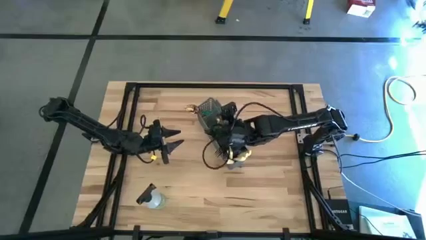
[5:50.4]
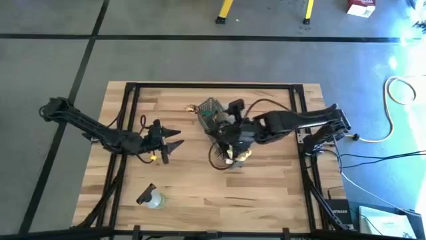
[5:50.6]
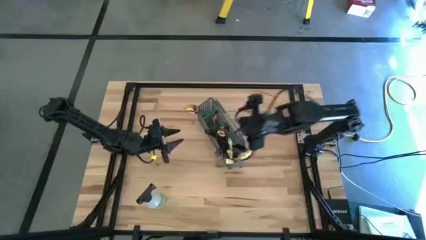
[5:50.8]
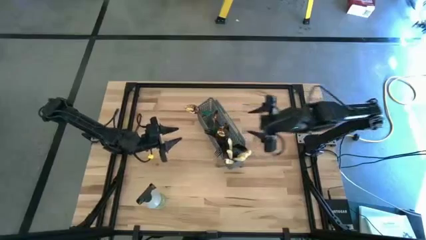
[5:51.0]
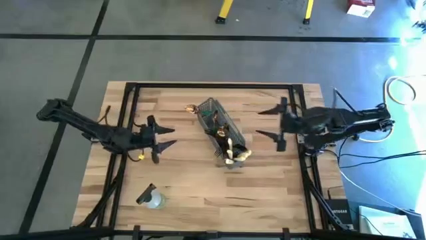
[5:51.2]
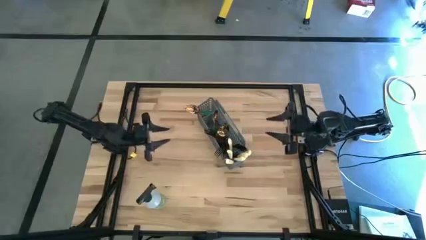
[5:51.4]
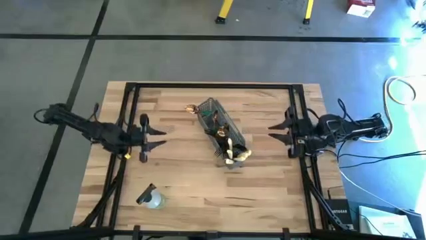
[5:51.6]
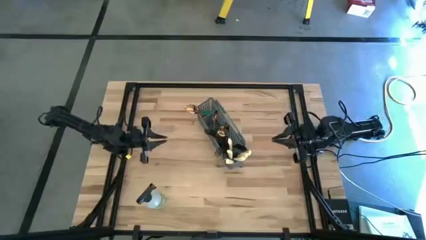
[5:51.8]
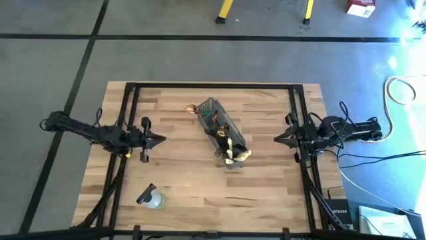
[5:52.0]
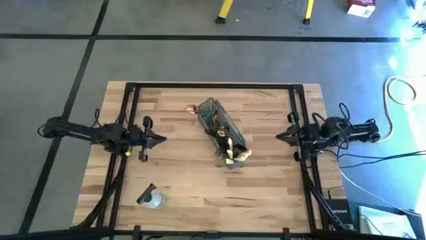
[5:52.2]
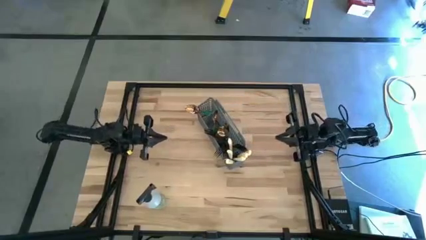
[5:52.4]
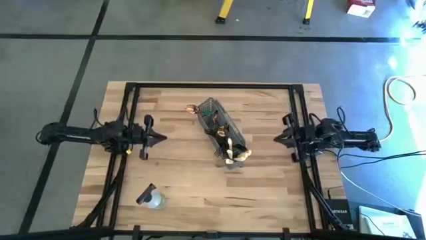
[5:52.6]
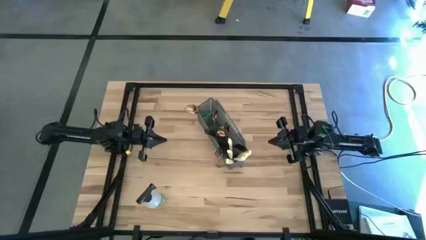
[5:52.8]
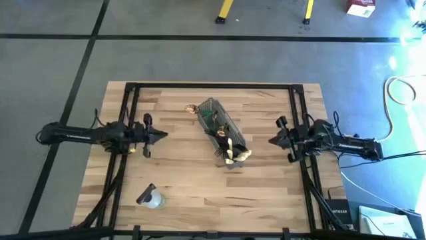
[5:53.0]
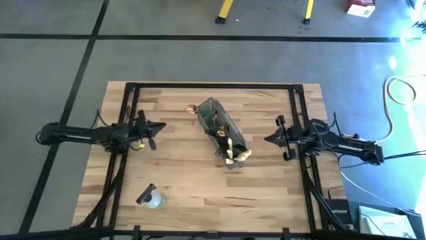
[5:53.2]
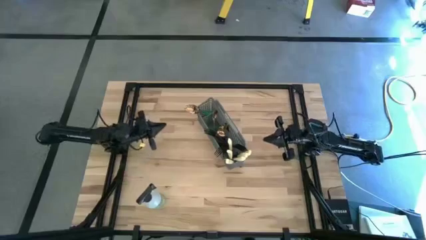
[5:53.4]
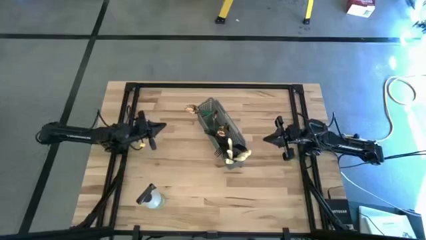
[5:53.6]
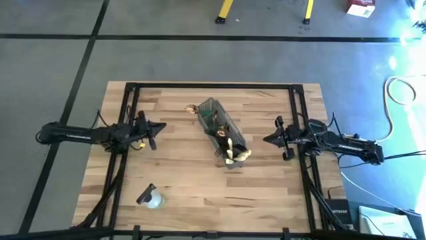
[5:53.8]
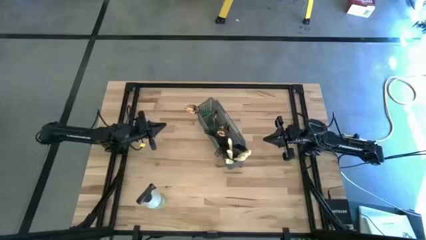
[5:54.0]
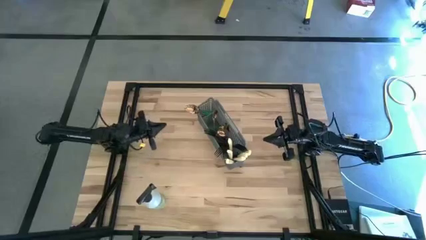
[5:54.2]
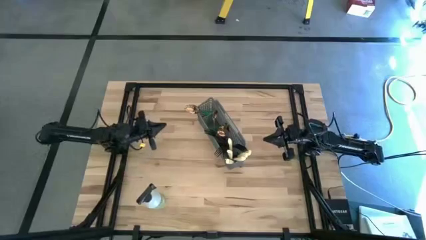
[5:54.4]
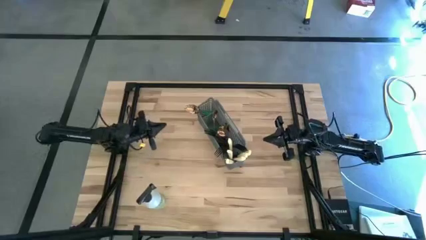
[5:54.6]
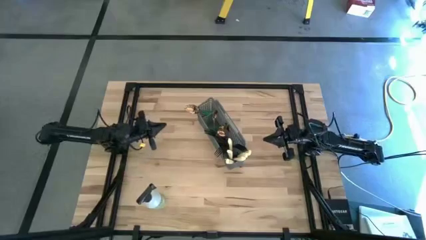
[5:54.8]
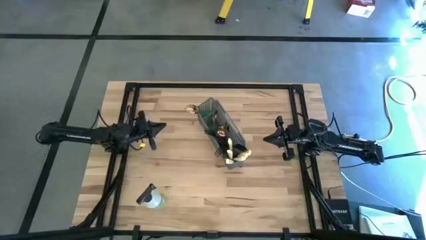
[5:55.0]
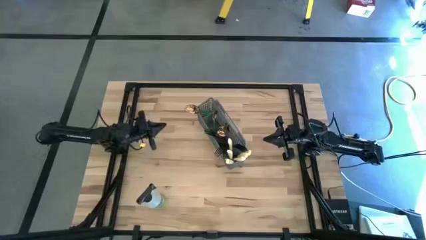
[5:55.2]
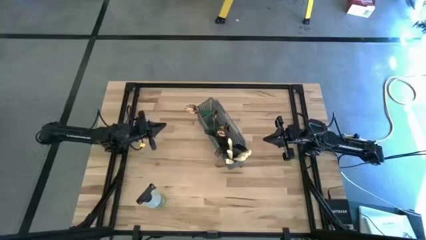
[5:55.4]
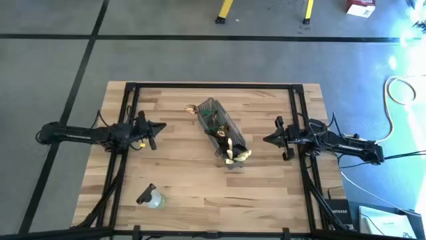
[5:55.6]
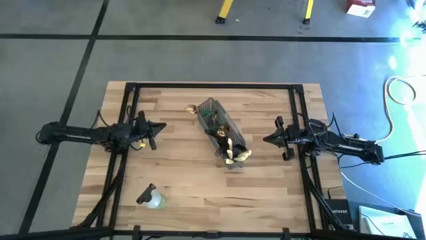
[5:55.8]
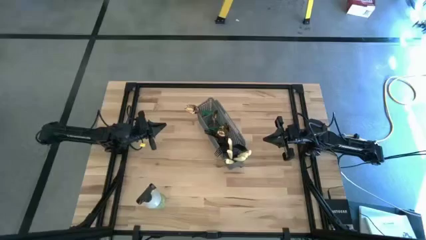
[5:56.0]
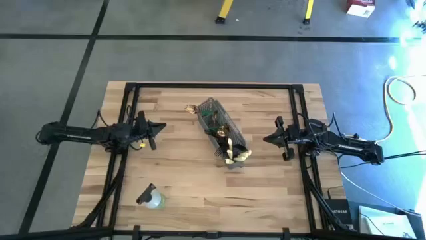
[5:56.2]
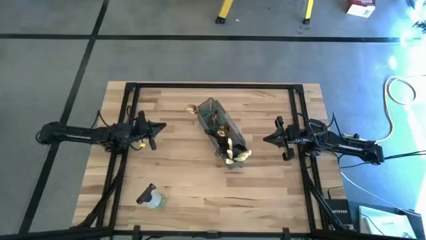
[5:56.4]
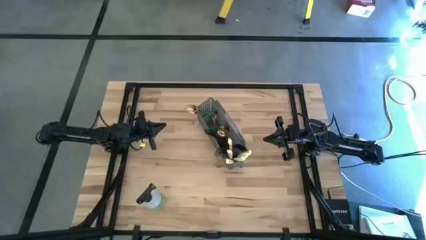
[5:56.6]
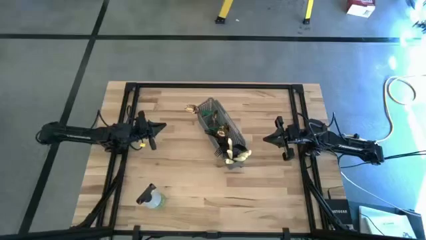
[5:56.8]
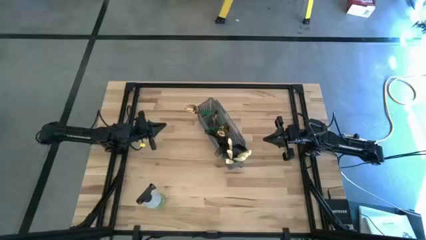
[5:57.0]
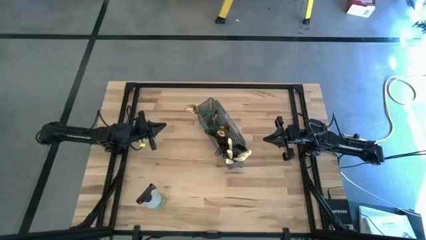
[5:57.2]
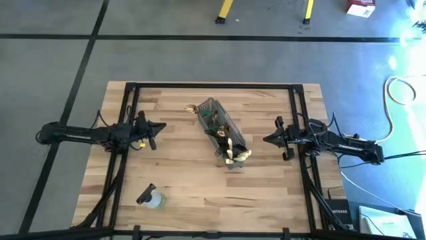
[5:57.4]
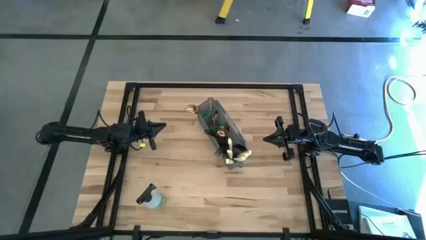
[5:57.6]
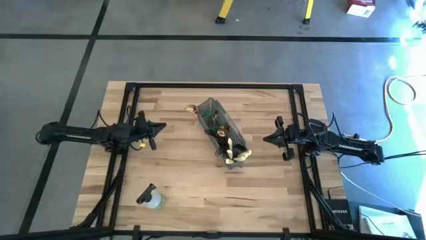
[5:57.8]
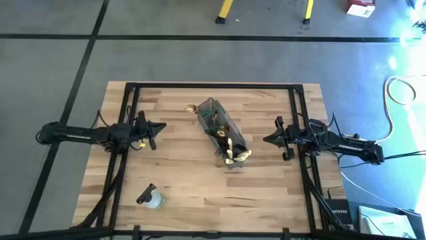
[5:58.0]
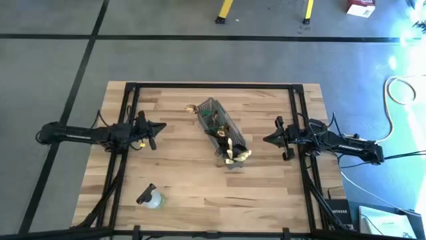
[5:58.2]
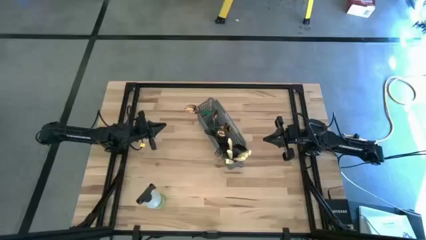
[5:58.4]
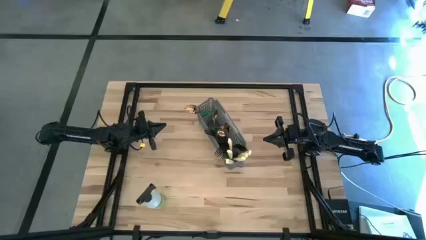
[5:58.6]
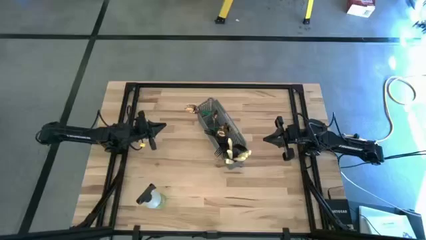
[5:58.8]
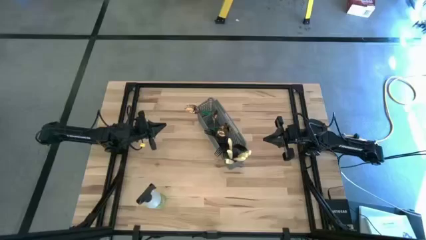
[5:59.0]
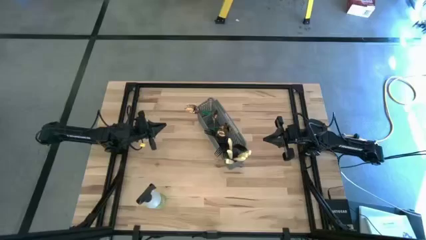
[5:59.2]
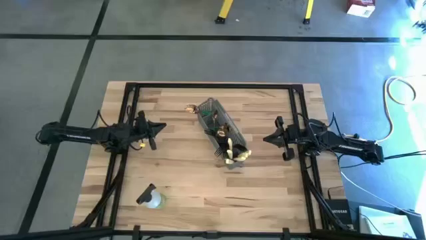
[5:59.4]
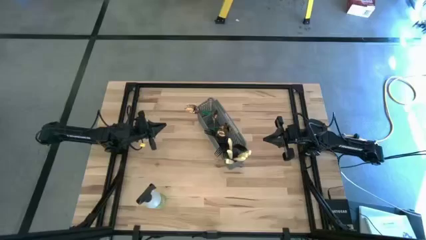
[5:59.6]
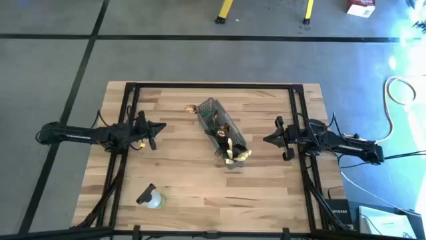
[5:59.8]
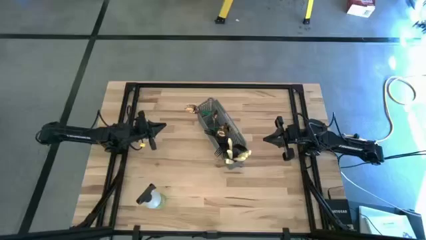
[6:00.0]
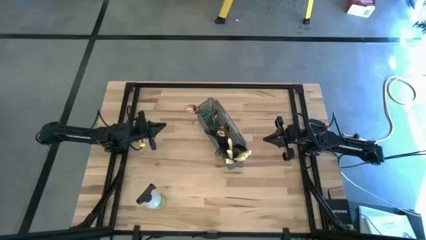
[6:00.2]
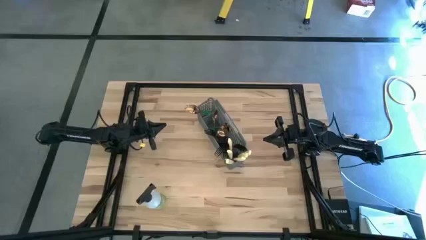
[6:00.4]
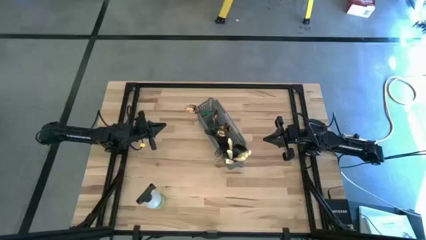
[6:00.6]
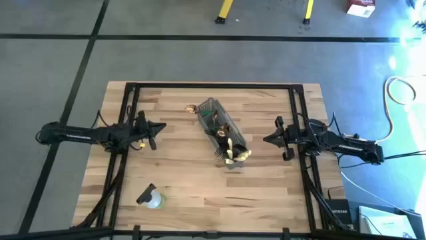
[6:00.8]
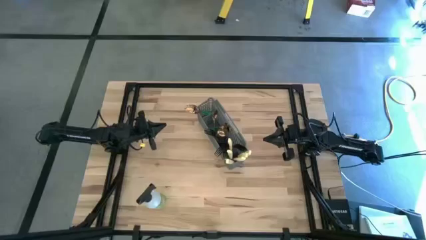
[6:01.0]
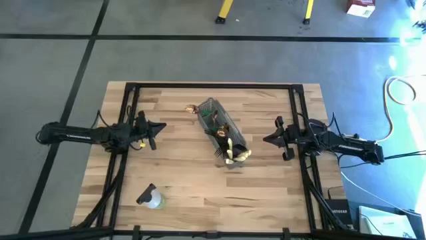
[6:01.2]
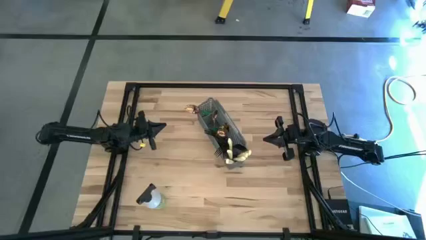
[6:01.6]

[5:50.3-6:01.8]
Task: Sort silverware
Return to Home Position

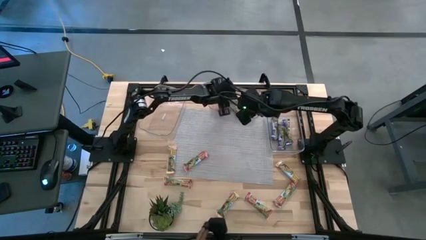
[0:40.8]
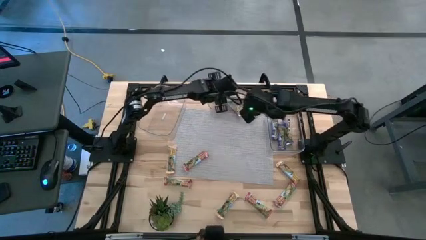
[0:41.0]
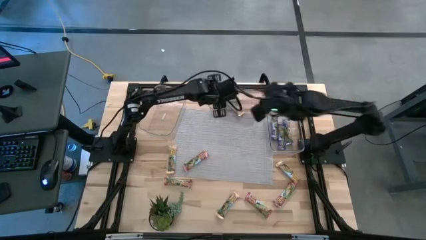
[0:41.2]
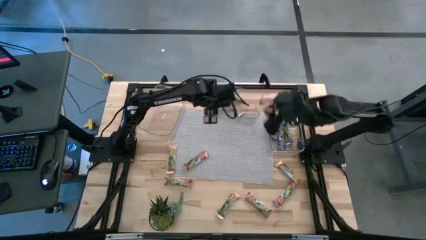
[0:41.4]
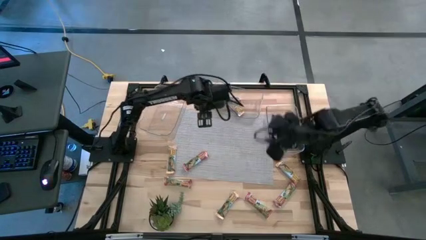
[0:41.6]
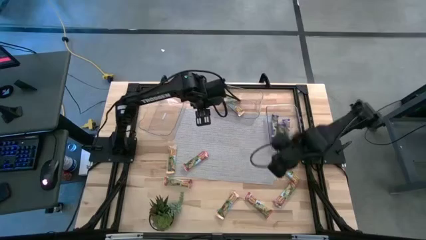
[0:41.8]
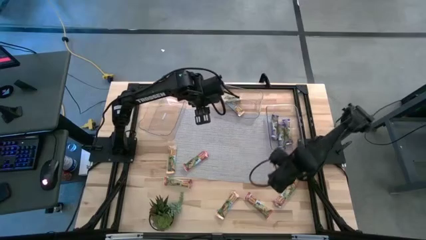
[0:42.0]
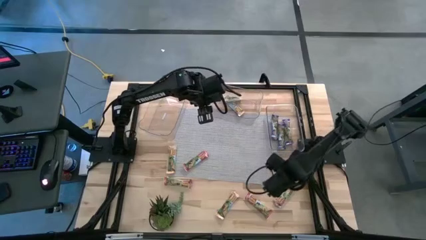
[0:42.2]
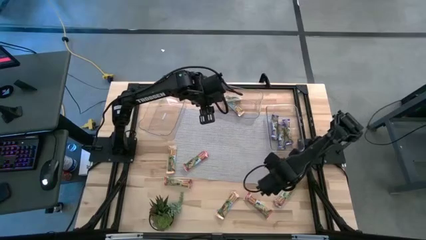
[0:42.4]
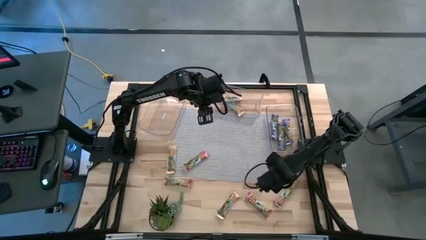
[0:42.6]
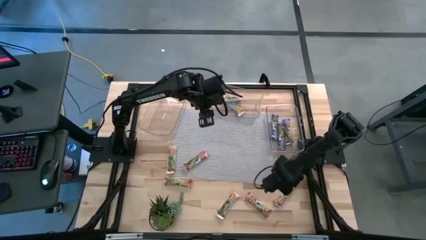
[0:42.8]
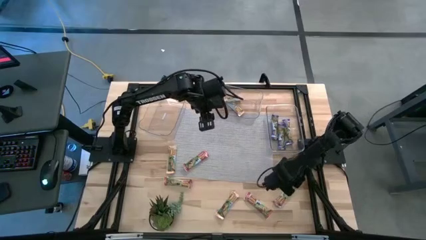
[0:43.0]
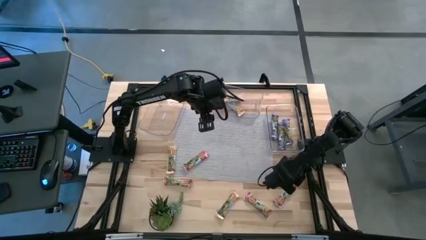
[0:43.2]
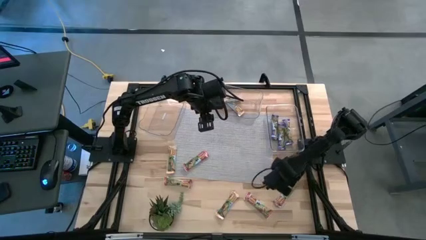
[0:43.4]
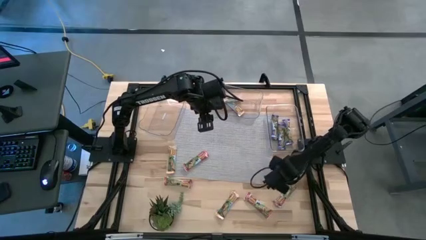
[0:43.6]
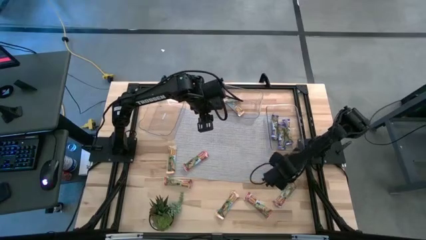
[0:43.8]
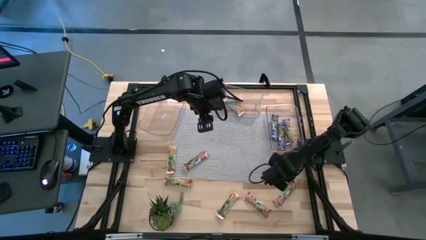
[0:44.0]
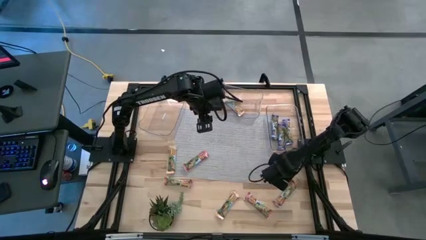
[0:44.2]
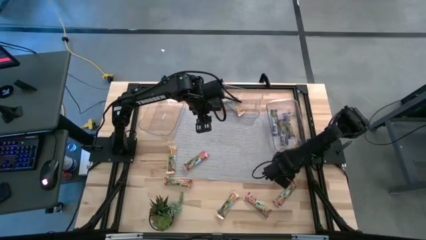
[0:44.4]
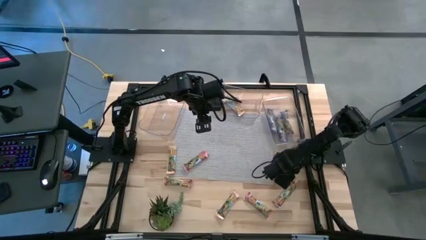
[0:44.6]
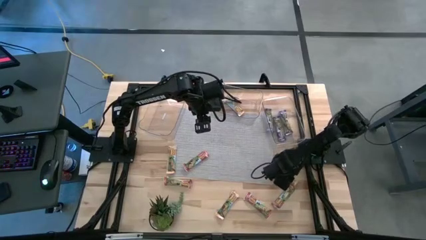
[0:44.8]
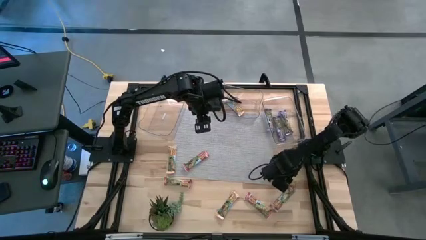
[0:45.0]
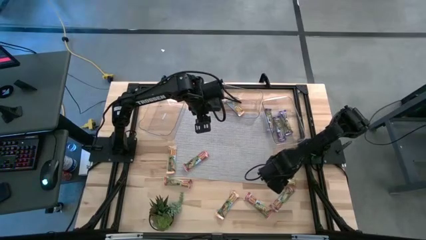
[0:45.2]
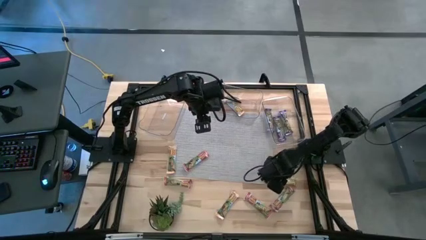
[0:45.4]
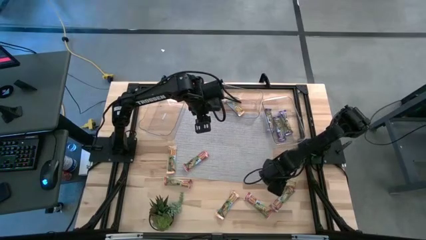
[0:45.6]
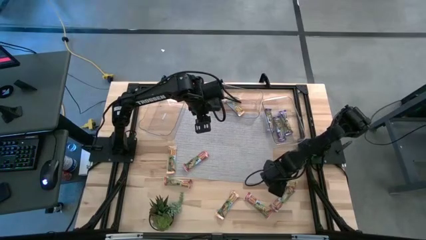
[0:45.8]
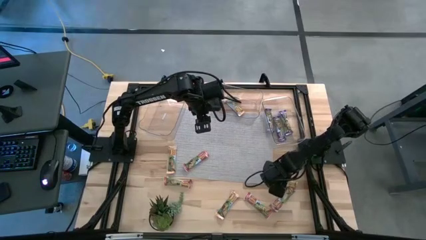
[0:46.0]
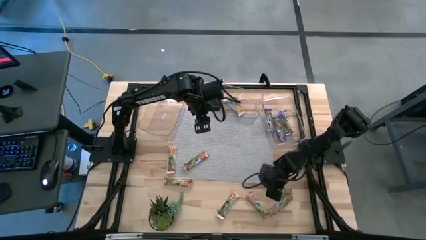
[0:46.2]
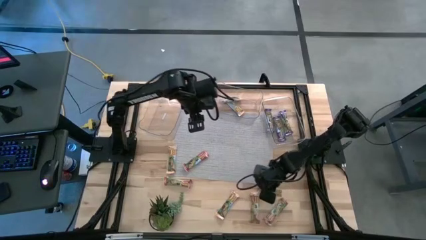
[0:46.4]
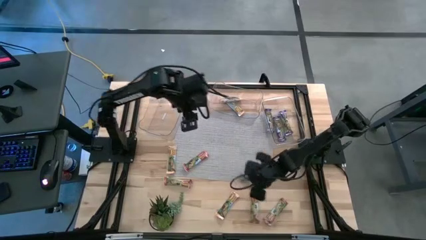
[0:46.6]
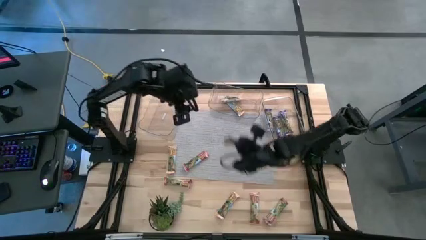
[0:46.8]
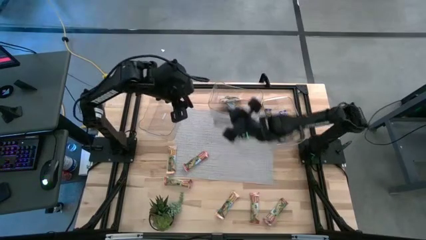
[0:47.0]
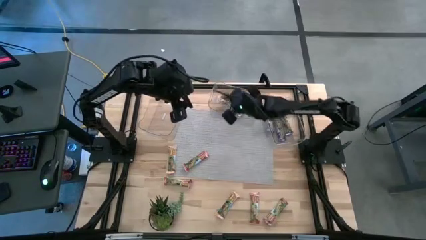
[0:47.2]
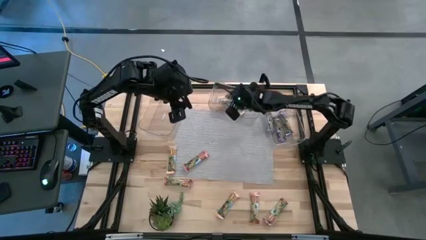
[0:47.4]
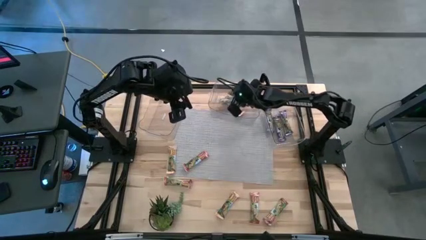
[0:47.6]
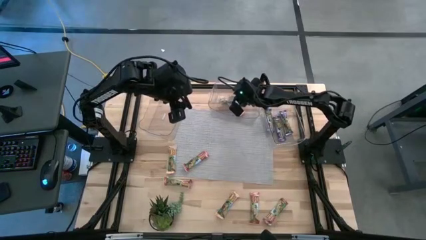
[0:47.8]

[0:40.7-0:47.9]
Task: Pick and place Granola Bars by type
Put the yellow granola bar into the middle transparent bin
